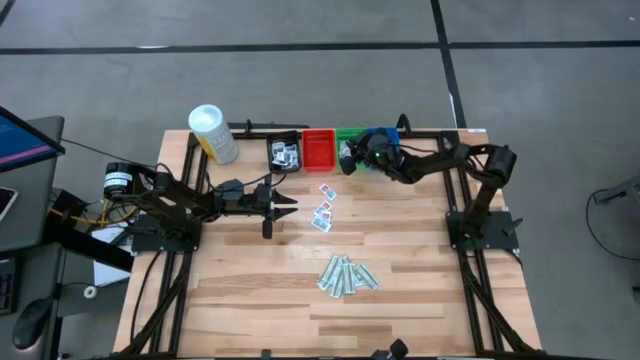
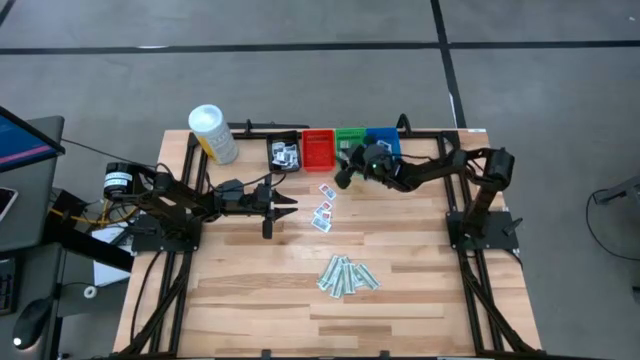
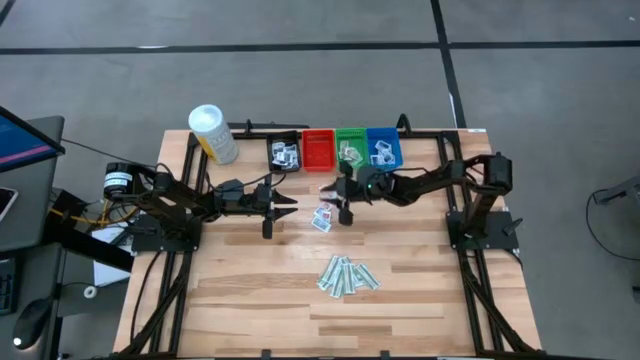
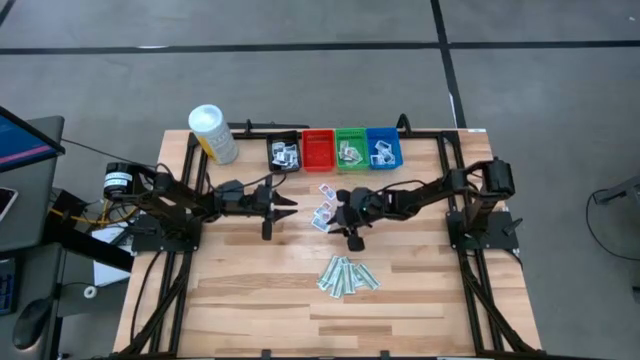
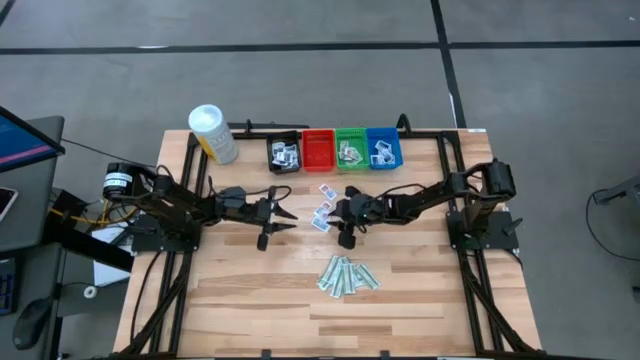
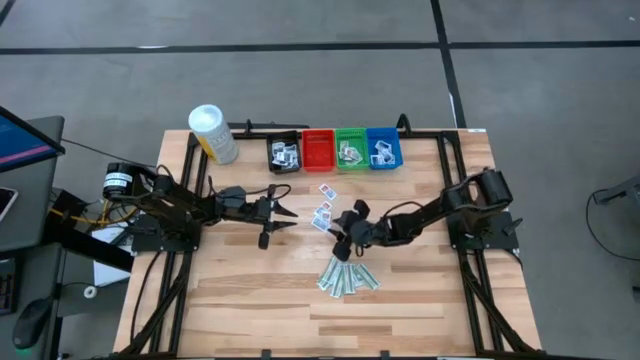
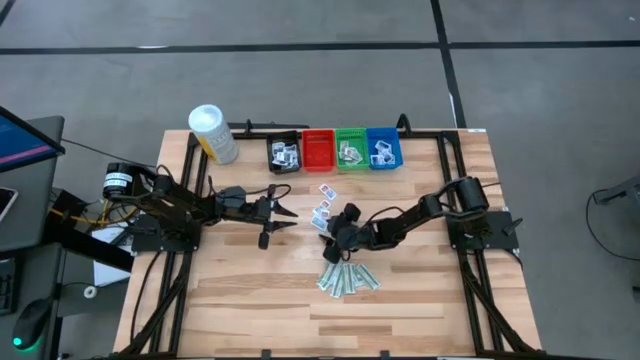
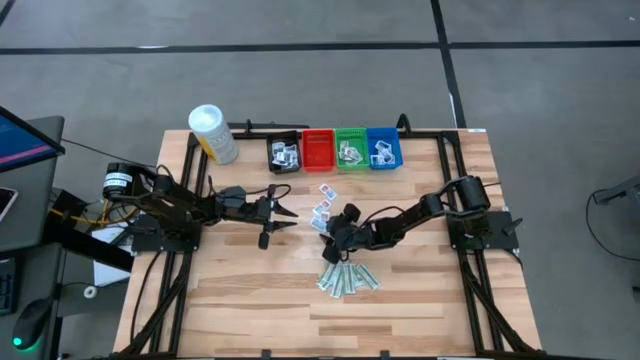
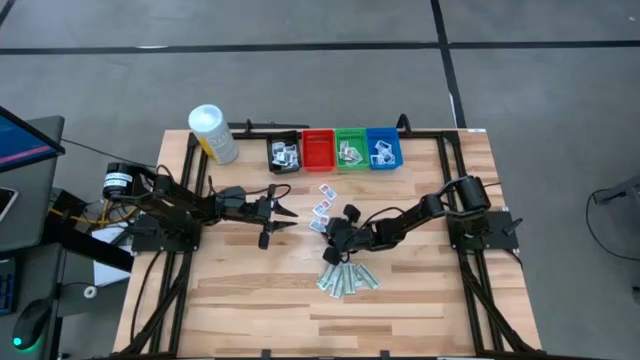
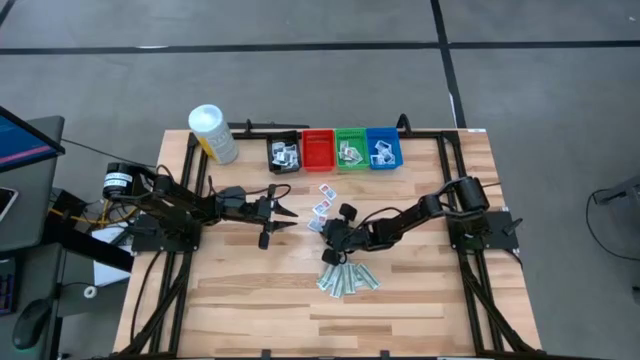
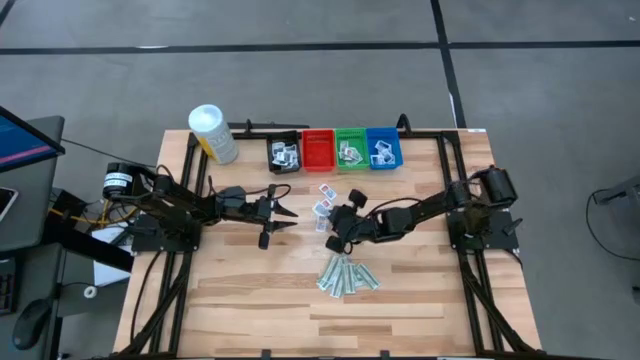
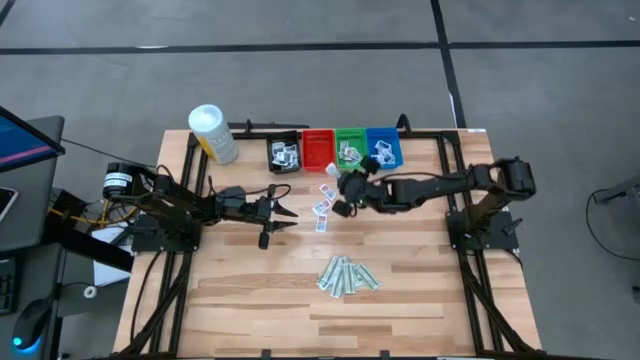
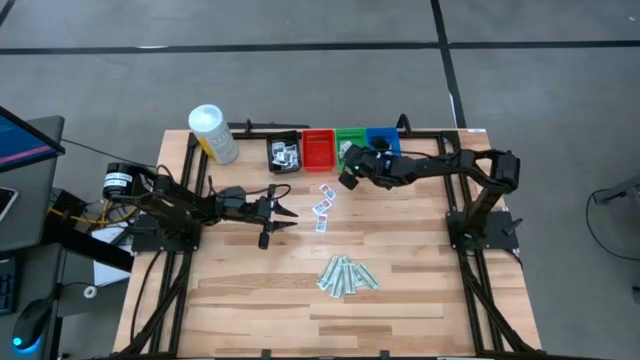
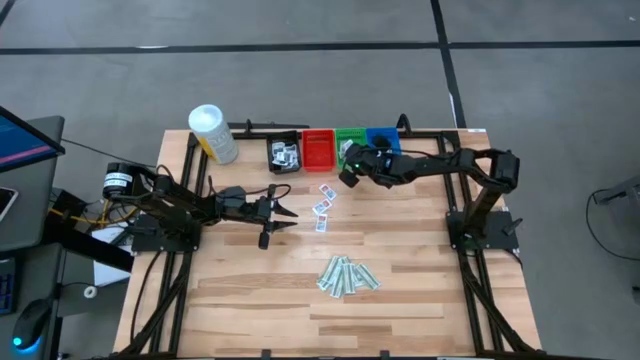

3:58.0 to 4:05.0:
Task: Pick & Place First Aid Supplies
Put the orange ointment pack into the green bin

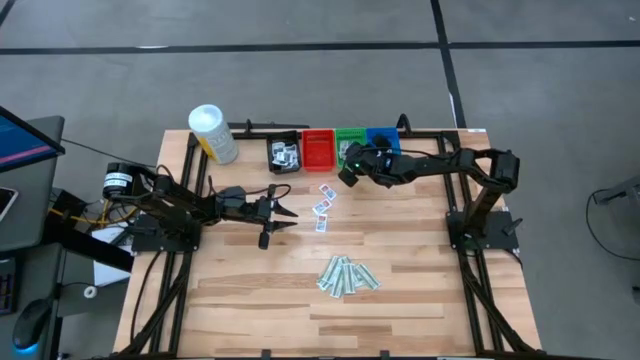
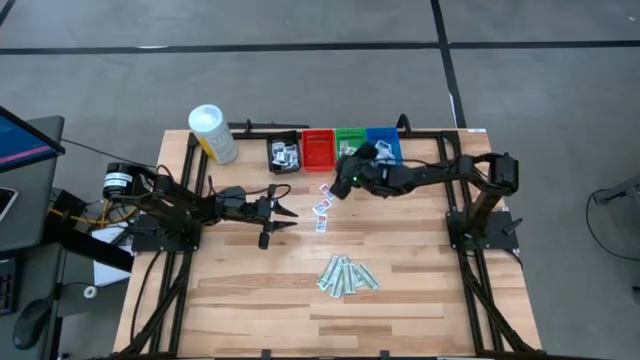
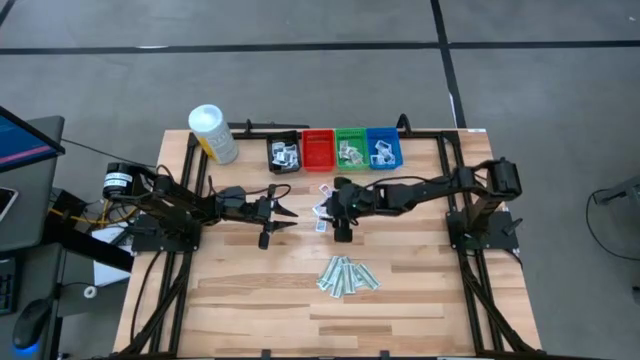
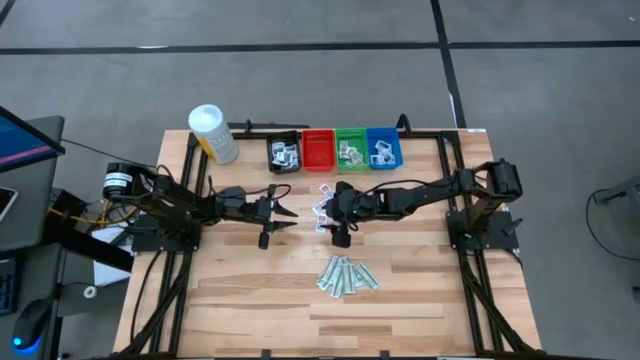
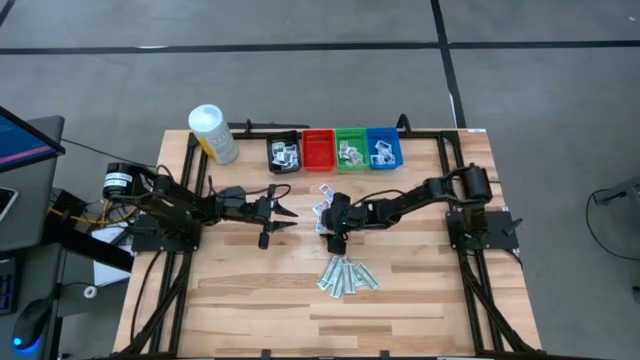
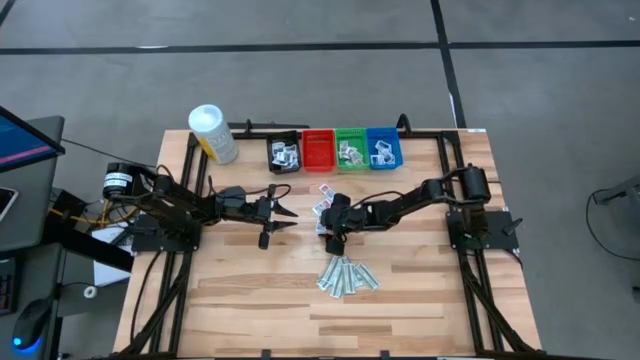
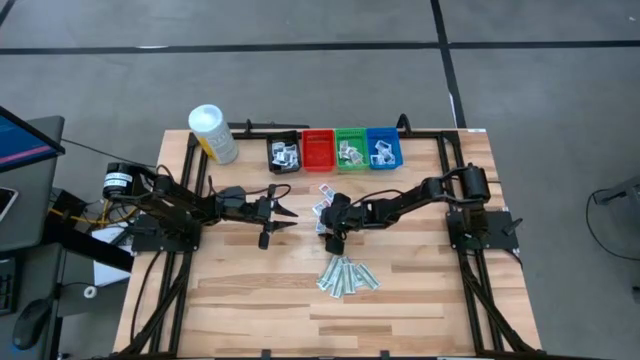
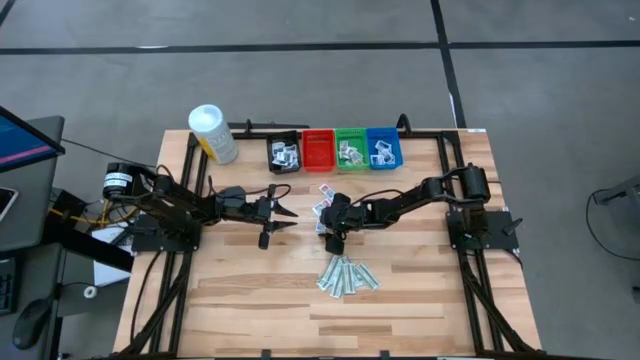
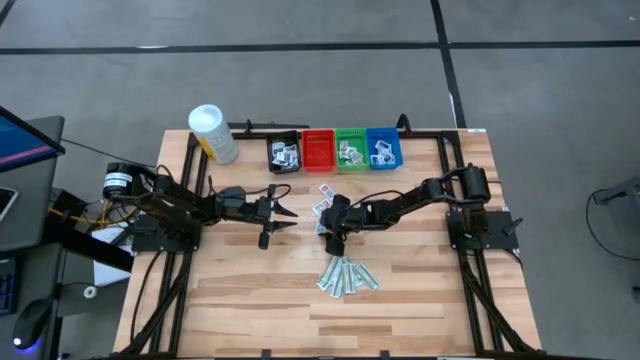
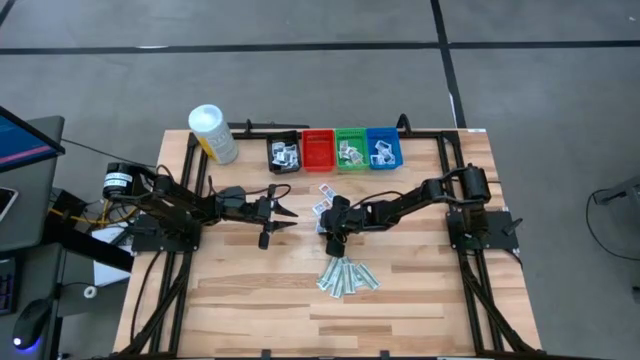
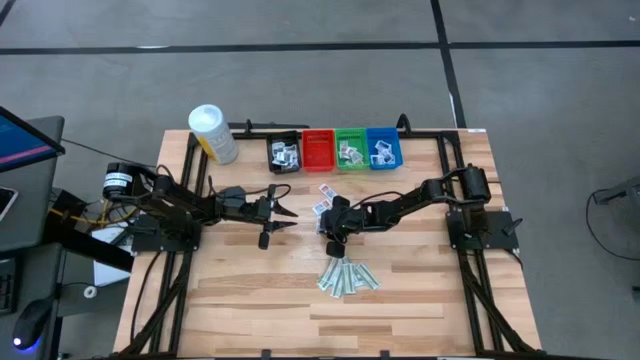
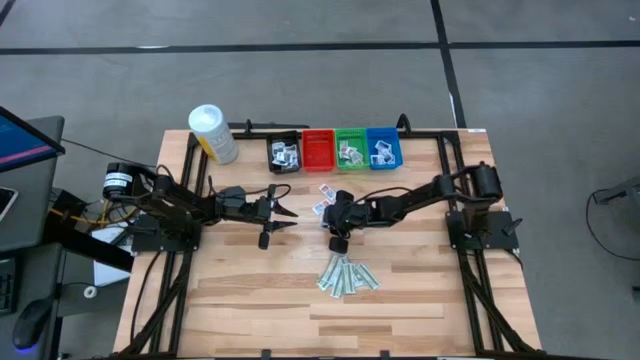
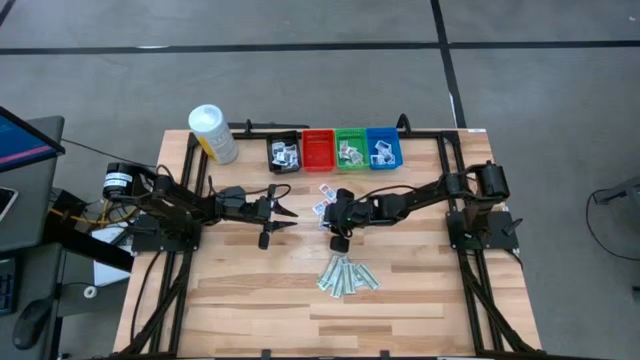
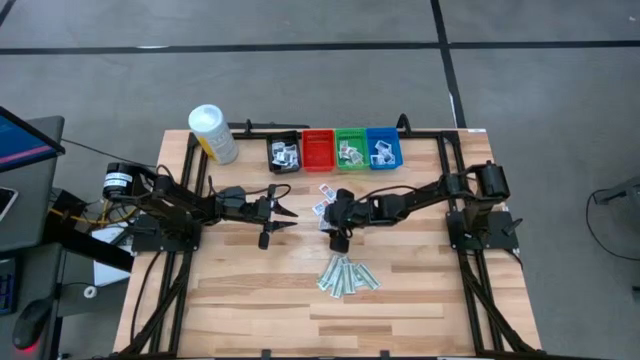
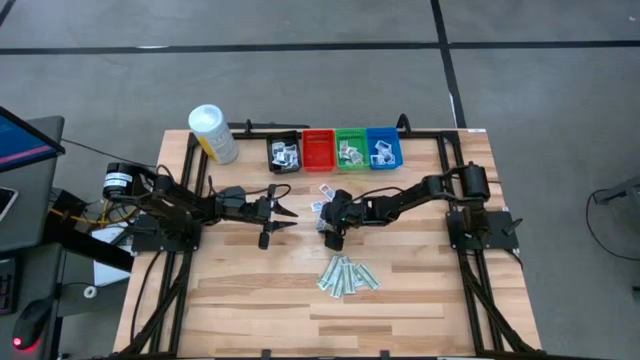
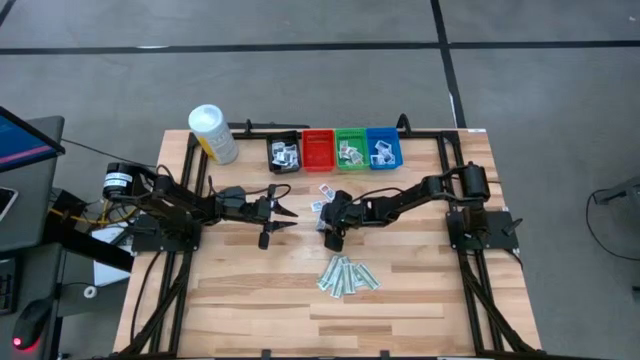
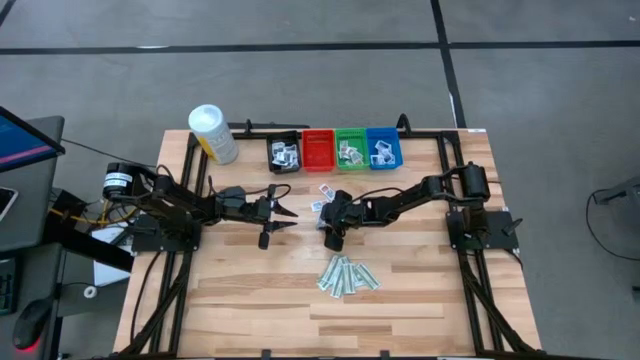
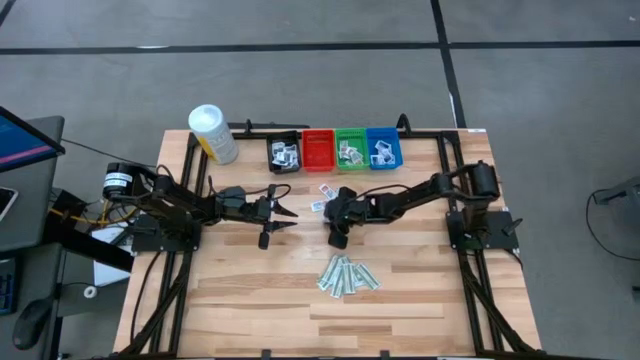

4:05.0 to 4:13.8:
Put the orange ointment pack into the green bin

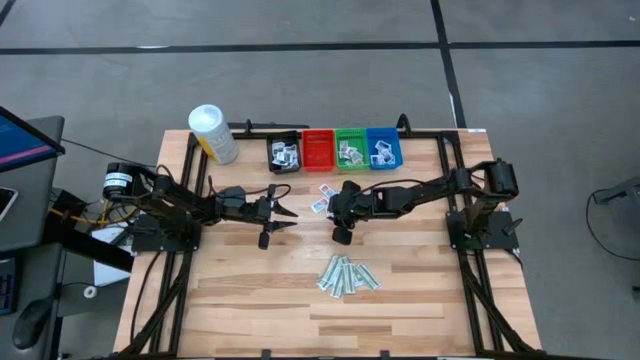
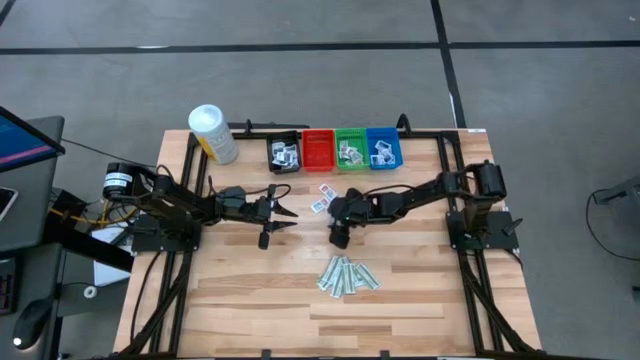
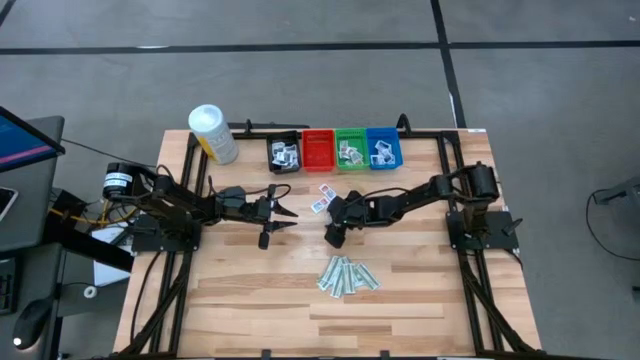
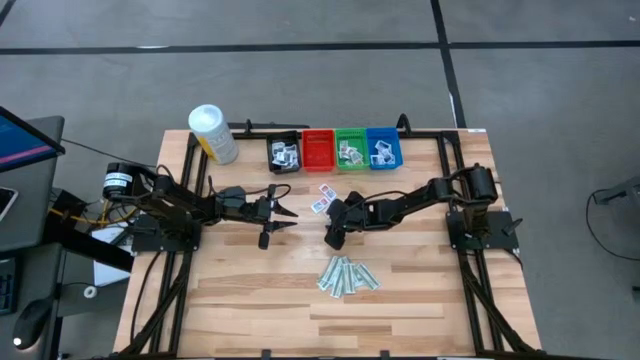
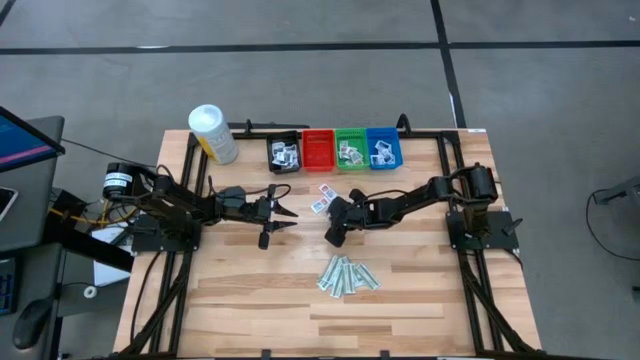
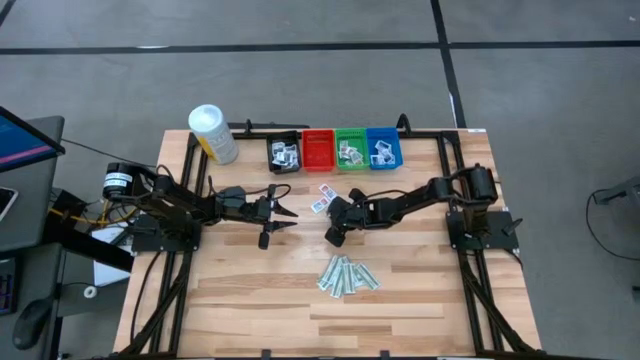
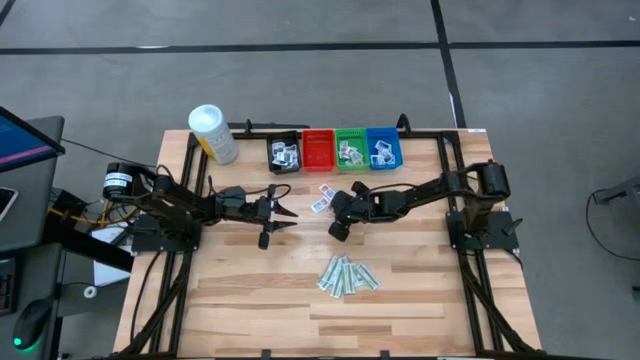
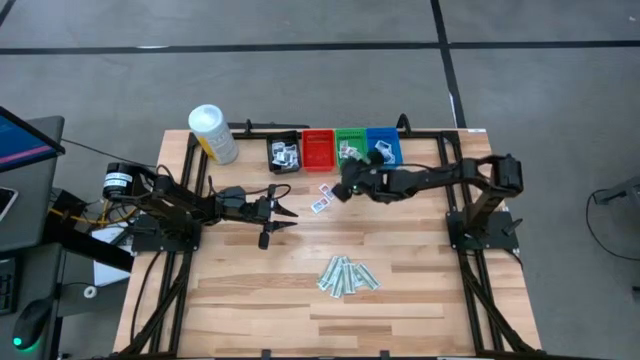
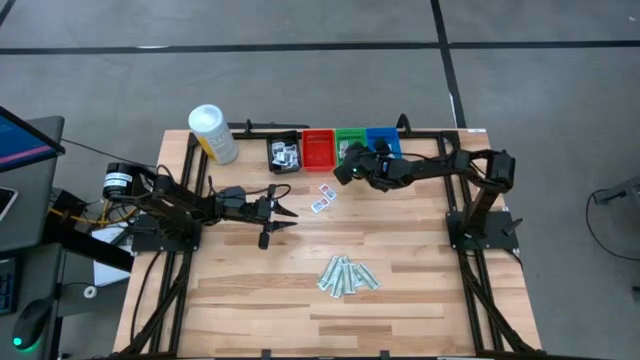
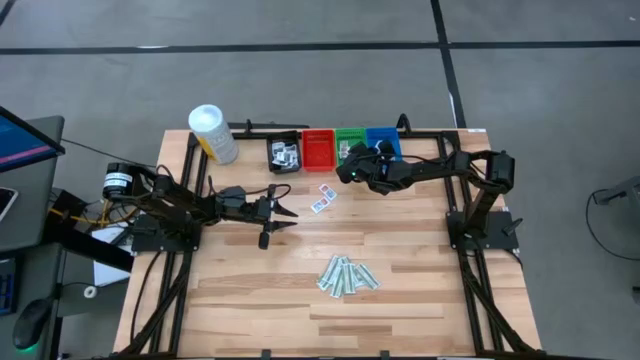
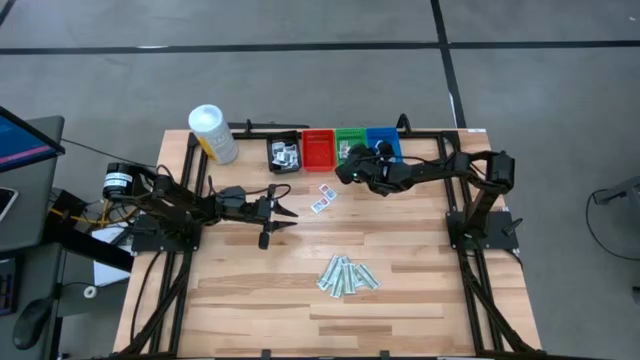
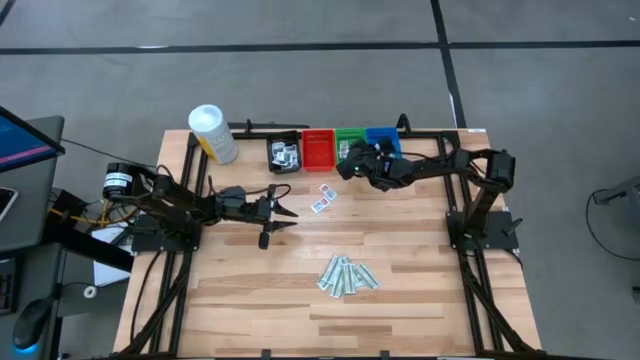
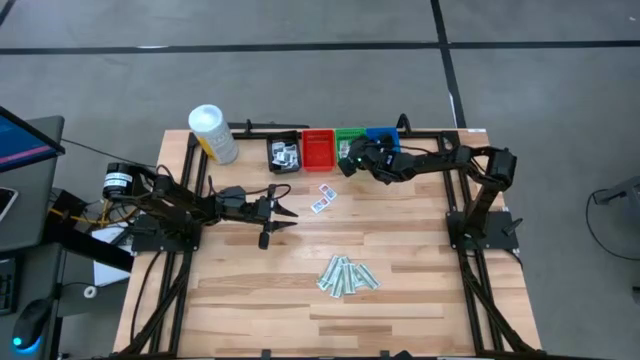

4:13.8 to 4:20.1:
Put the orange ointment pack into the green bin
